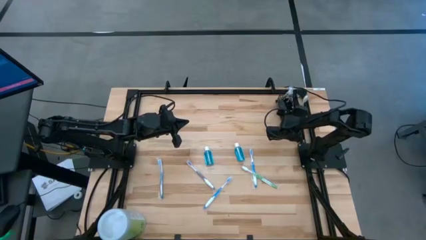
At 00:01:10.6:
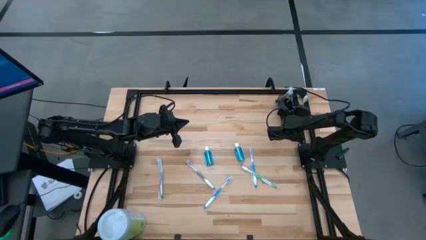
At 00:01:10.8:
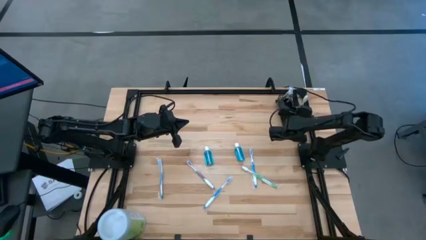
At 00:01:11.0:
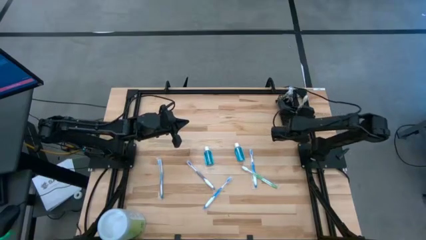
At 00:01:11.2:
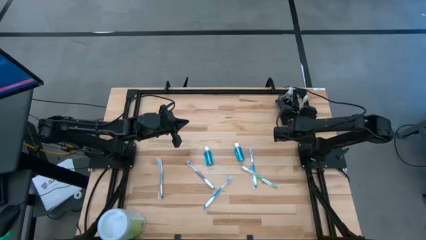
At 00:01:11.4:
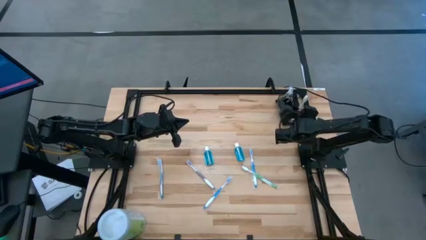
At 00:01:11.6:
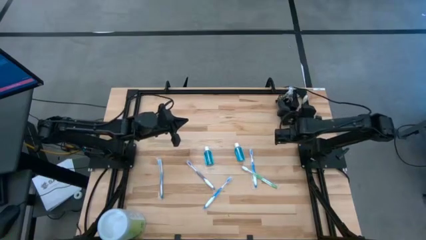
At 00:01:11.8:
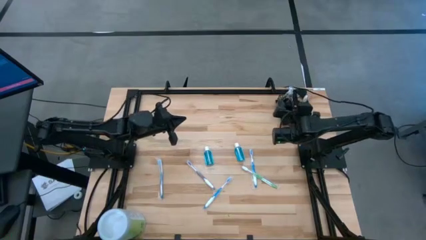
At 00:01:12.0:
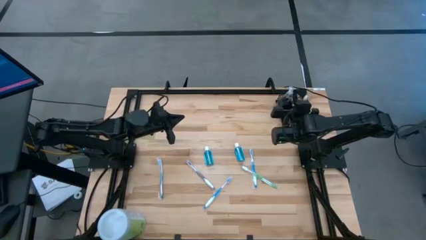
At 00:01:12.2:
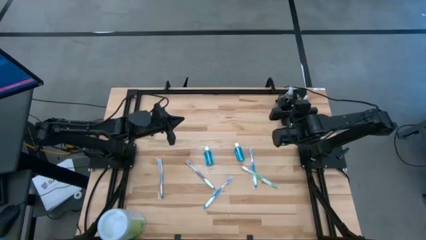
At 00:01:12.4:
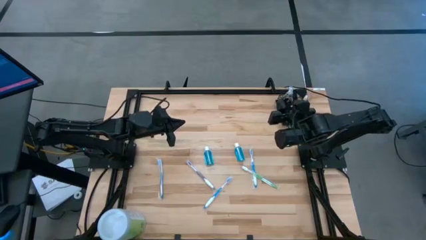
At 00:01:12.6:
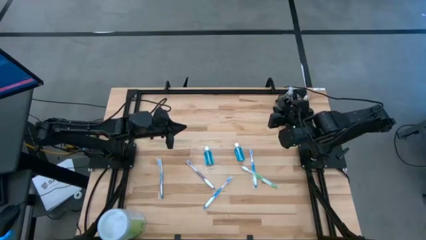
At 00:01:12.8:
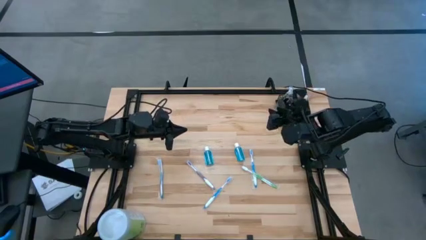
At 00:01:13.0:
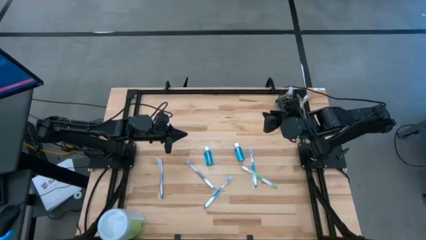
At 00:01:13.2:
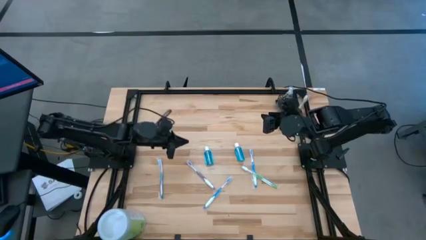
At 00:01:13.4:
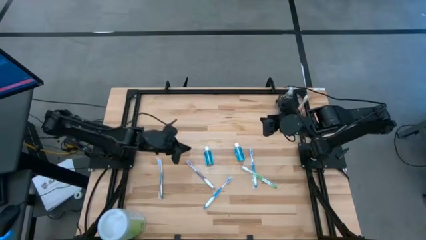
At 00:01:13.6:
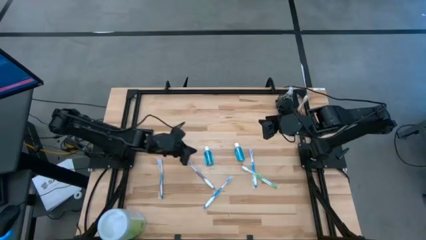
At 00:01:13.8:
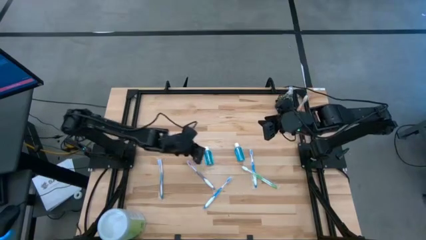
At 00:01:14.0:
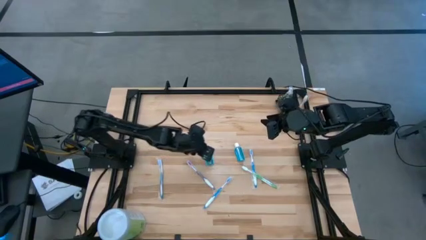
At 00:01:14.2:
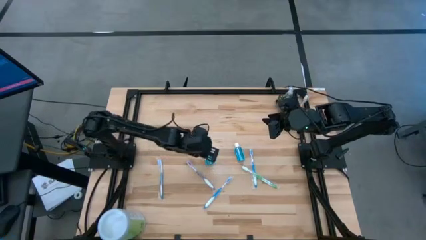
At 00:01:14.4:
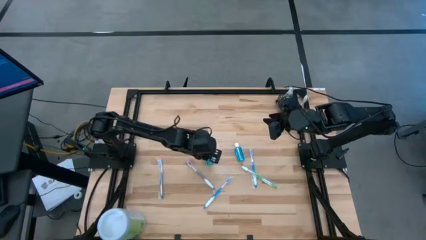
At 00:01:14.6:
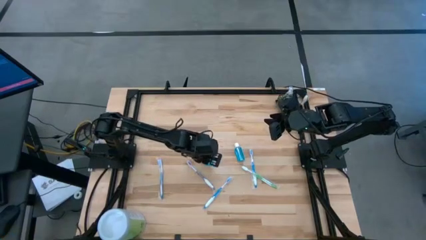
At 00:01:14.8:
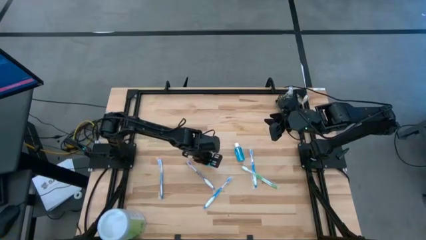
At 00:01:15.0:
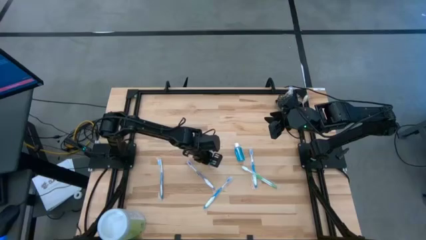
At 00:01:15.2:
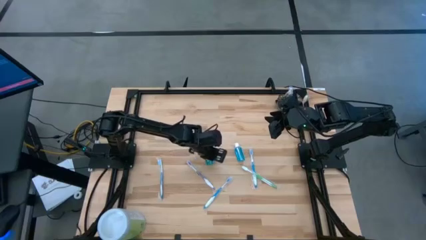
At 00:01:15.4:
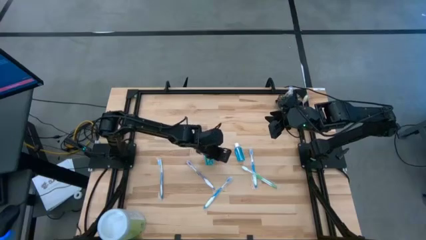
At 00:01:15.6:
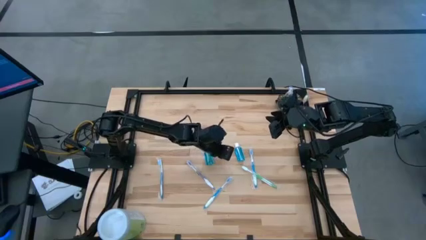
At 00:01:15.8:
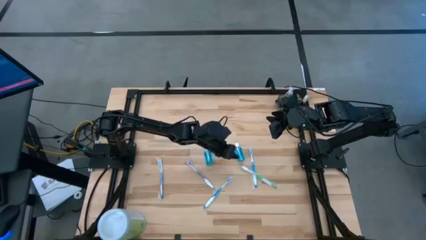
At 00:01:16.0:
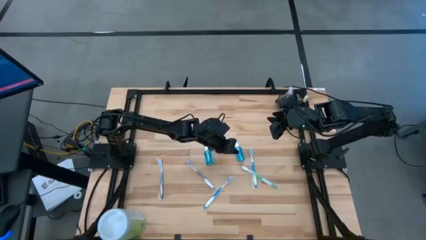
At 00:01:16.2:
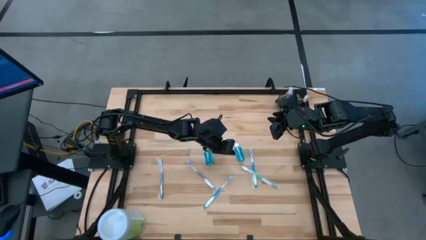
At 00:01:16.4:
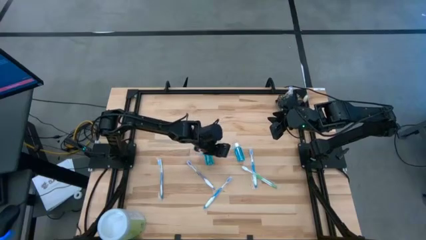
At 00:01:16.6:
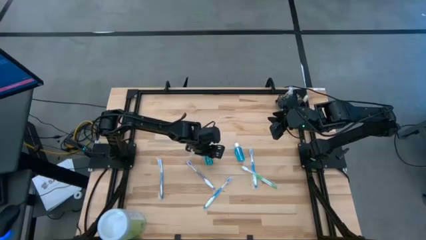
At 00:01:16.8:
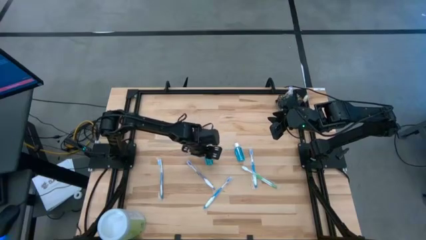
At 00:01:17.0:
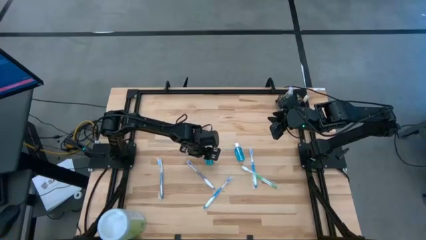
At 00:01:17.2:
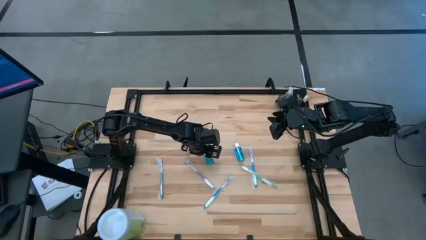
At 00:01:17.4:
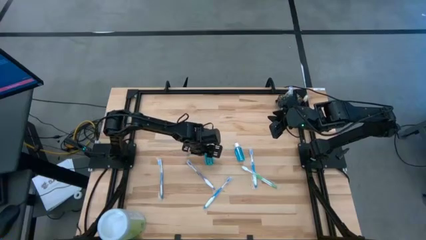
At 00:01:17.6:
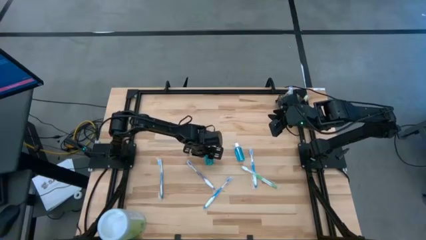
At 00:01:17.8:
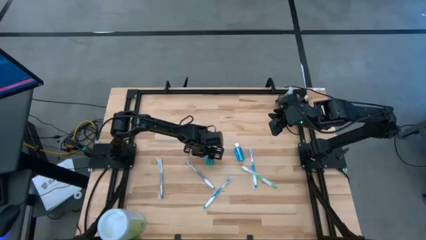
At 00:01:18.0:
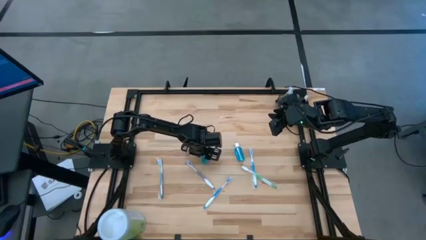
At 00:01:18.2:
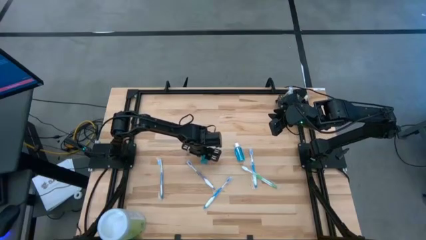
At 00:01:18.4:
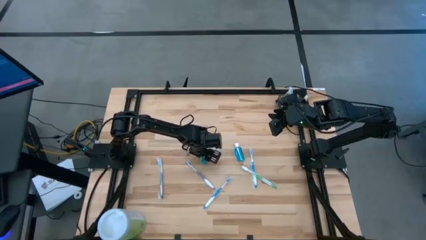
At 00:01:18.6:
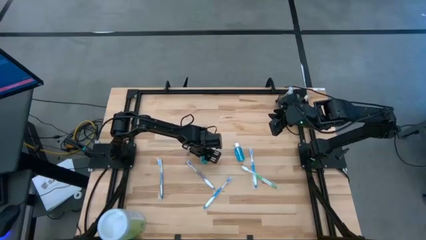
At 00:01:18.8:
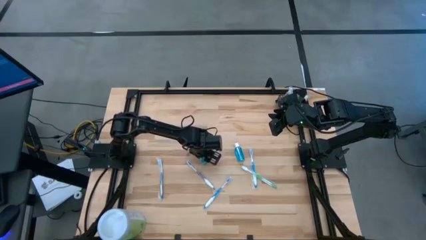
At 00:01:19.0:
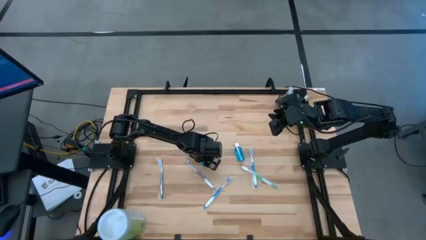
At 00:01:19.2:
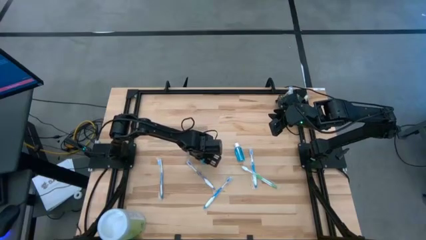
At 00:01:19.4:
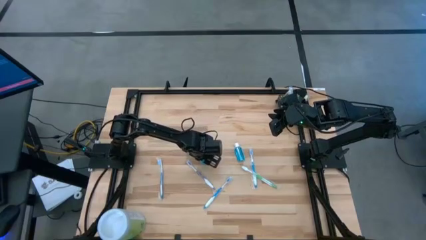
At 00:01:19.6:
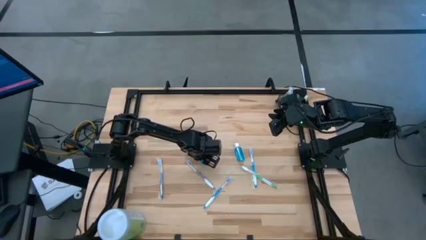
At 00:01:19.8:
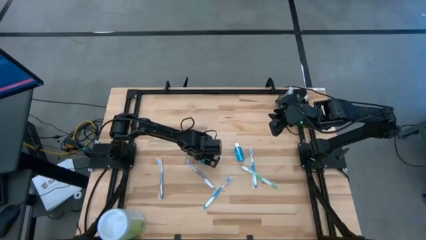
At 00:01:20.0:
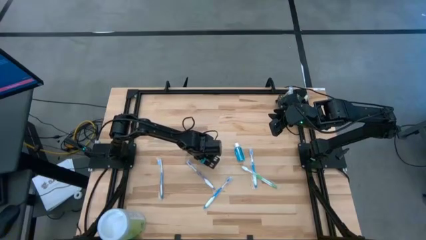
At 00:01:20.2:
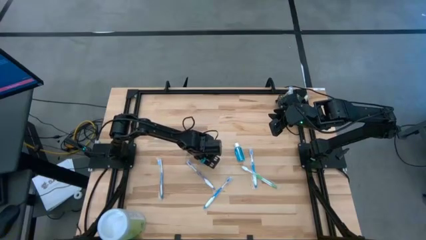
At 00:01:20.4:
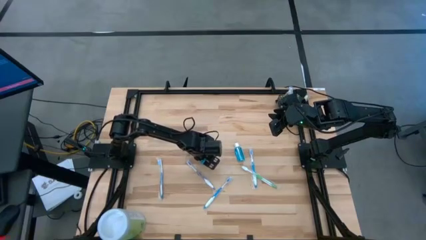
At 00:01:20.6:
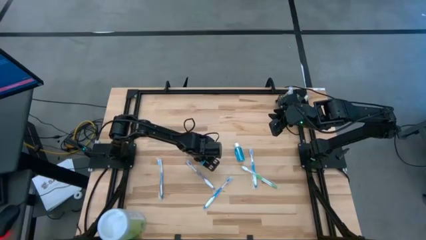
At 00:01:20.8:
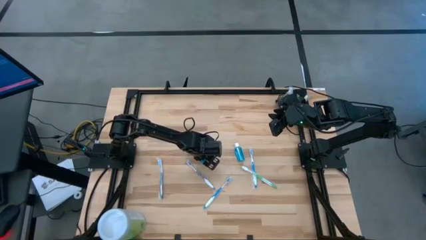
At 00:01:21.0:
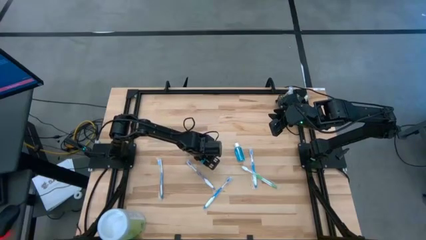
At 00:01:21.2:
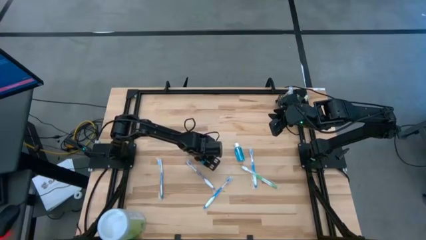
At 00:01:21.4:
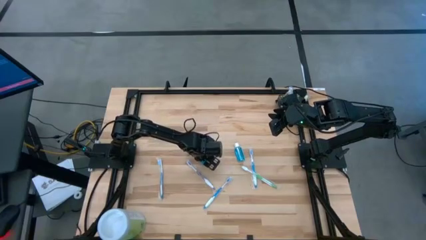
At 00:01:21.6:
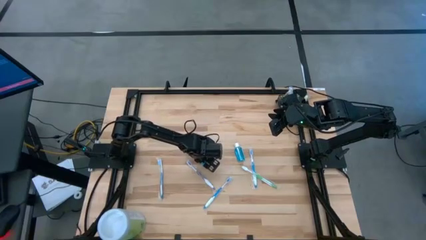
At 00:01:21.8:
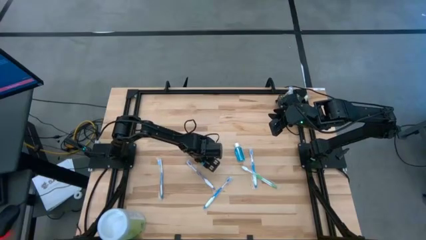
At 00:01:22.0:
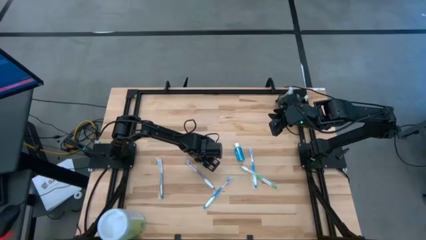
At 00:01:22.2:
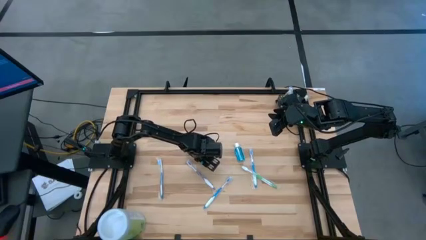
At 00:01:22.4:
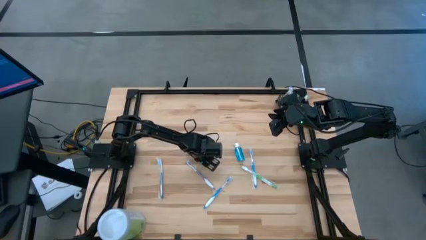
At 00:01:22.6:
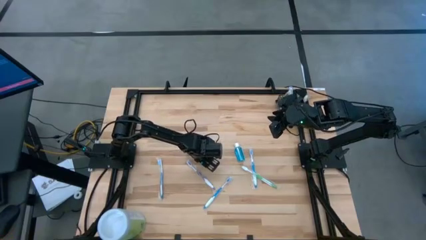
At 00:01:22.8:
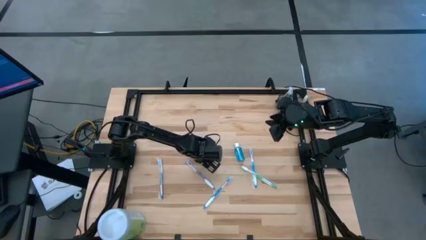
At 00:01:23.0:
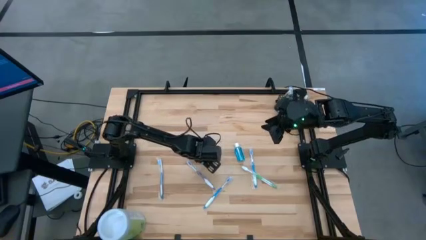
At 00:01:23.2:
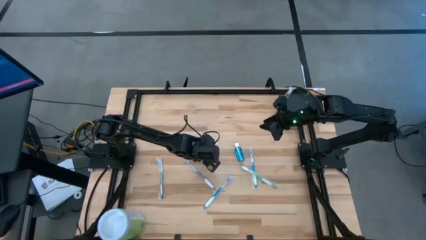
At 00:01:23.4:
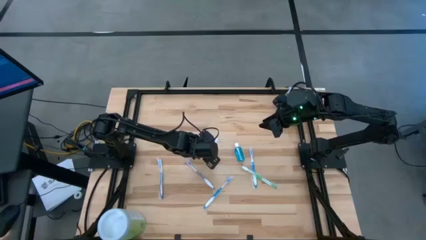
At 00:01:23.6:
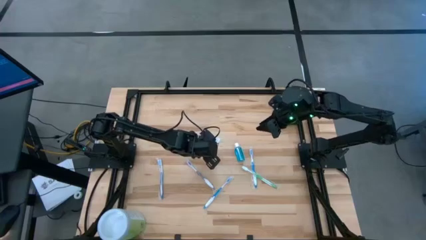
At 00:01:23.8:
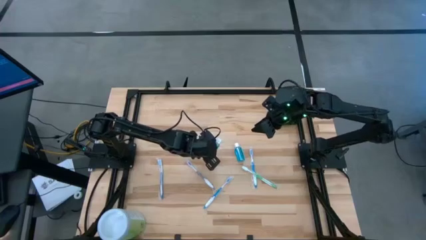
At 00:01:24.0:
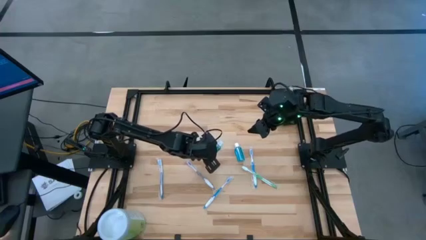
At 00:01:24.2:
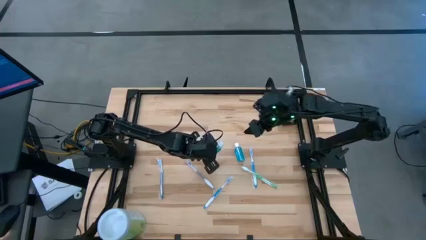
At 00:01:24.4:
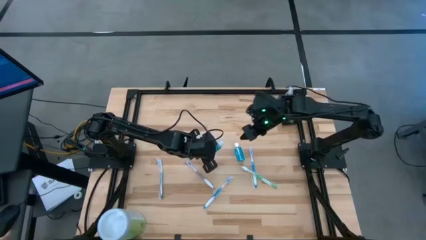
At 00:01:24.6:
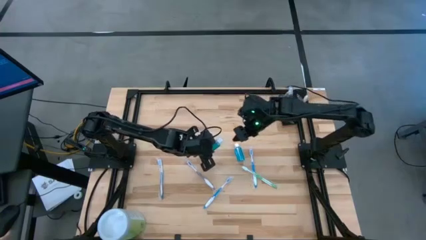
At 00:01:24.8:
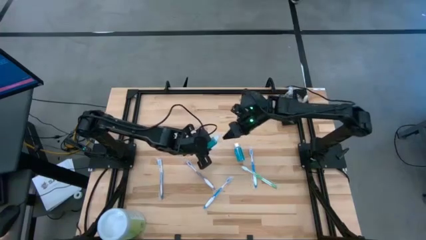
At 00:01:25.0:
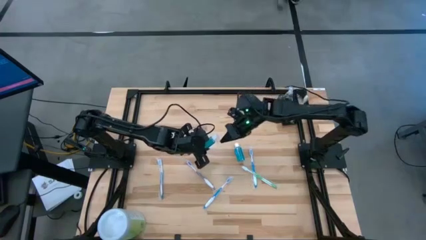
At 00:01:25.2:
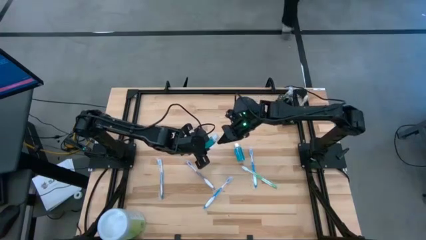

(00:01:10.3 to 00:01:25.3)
Task: Pick & Place toothbrushing station
Put the left blue mouthwash into the middle section of wire organizer
